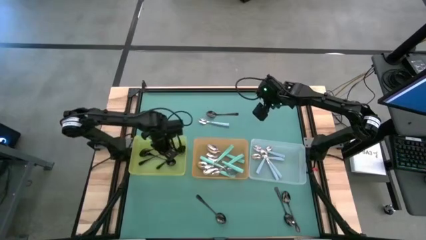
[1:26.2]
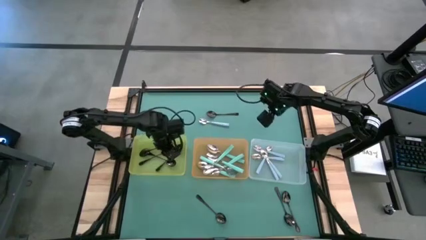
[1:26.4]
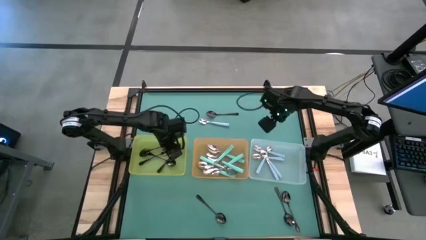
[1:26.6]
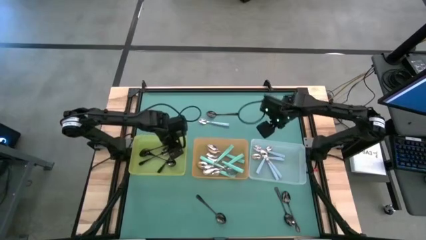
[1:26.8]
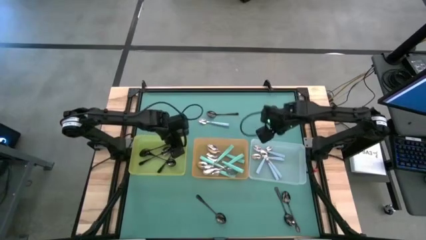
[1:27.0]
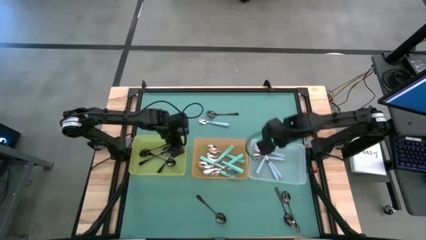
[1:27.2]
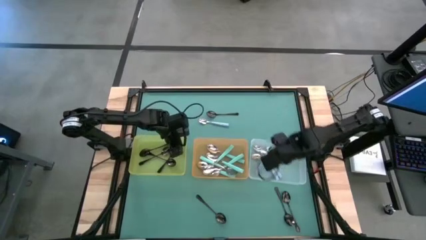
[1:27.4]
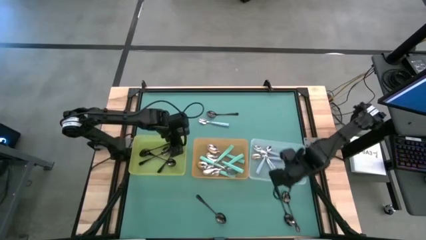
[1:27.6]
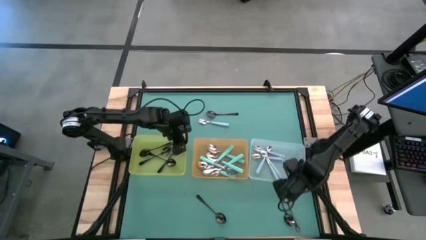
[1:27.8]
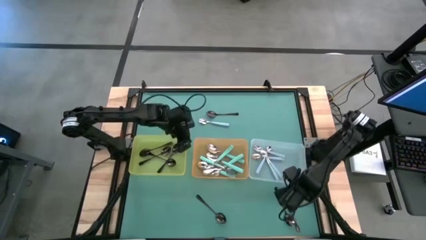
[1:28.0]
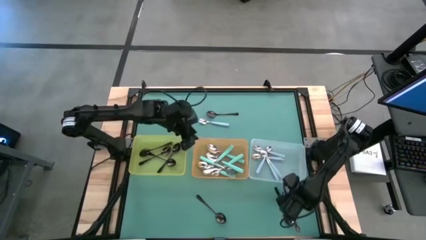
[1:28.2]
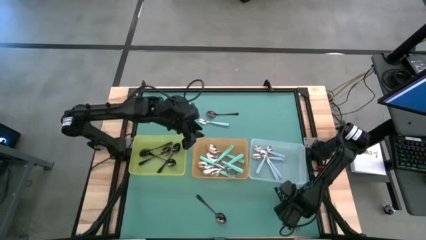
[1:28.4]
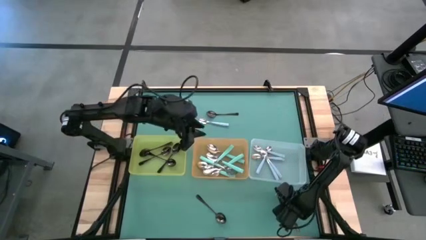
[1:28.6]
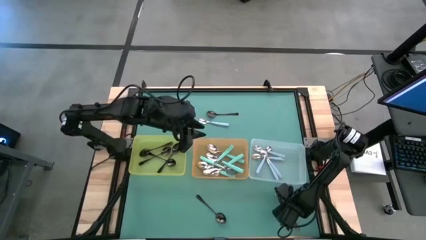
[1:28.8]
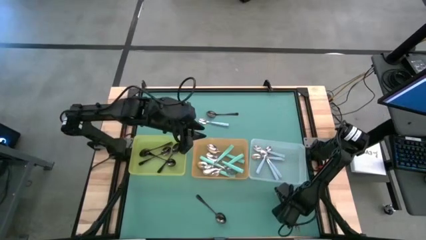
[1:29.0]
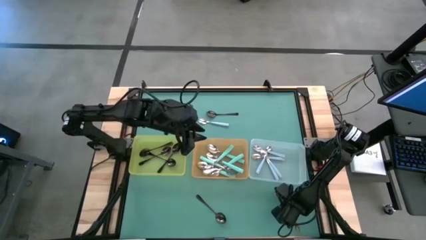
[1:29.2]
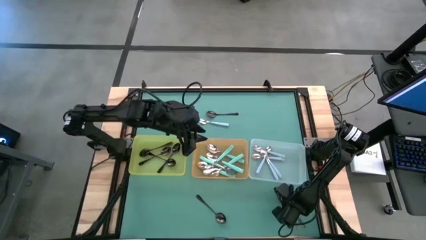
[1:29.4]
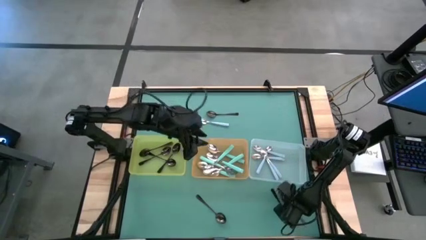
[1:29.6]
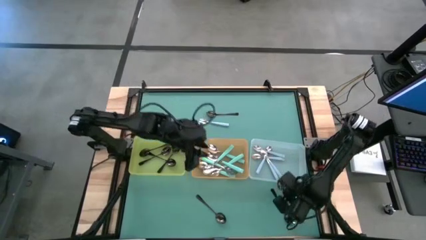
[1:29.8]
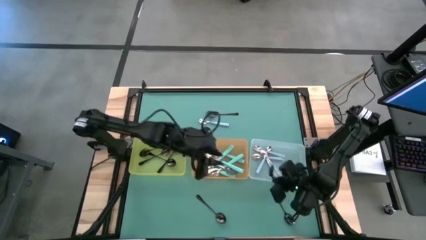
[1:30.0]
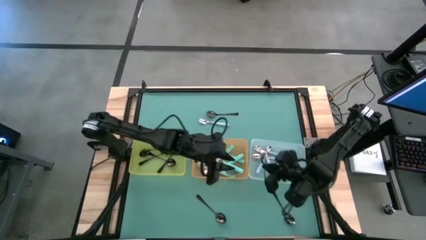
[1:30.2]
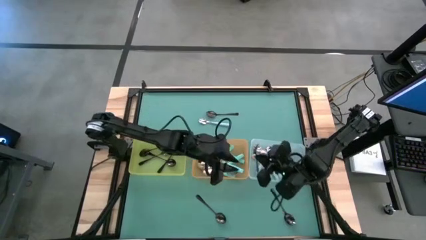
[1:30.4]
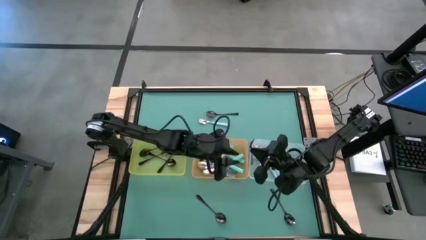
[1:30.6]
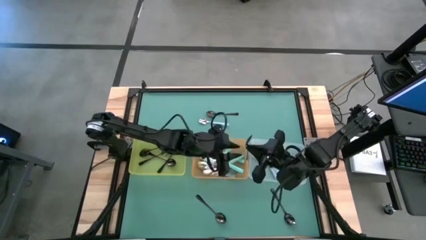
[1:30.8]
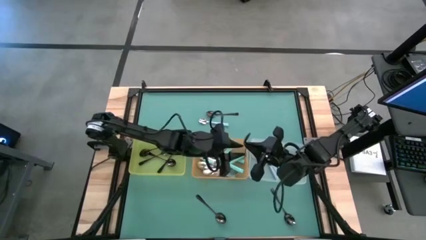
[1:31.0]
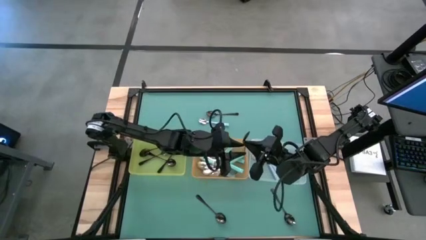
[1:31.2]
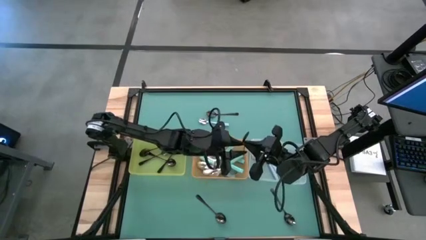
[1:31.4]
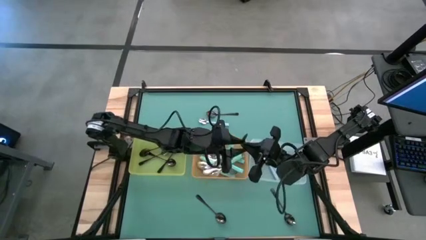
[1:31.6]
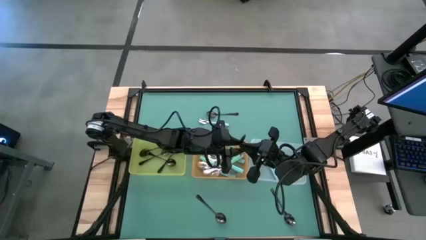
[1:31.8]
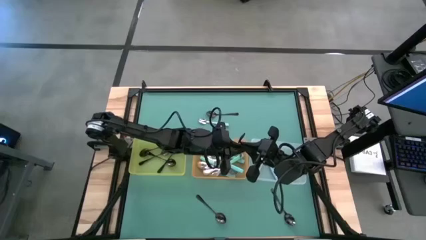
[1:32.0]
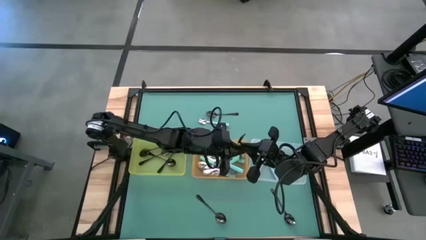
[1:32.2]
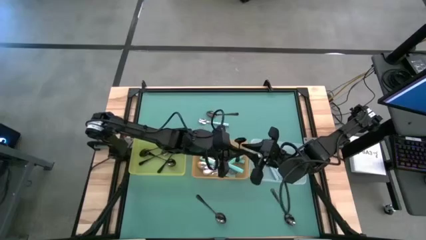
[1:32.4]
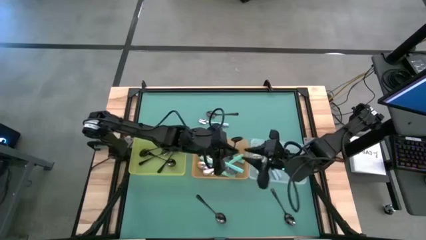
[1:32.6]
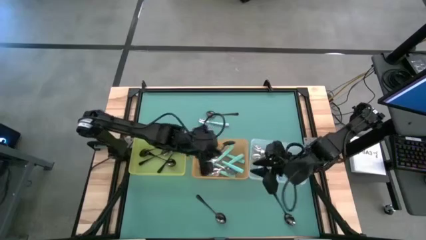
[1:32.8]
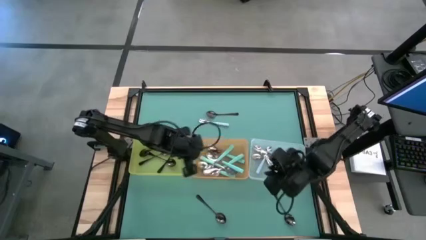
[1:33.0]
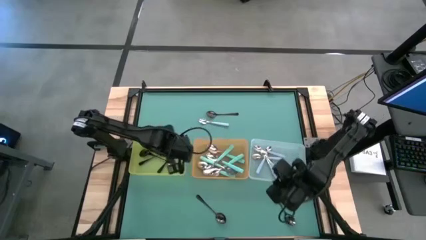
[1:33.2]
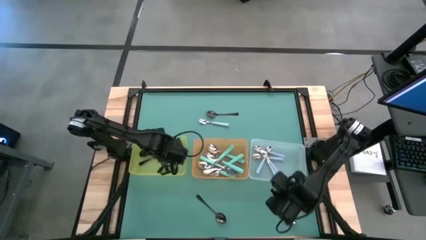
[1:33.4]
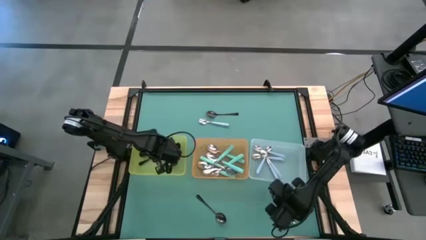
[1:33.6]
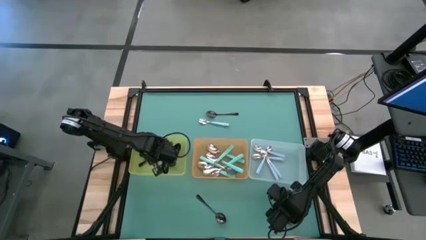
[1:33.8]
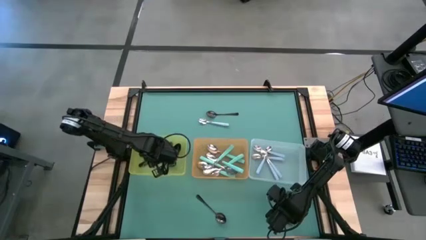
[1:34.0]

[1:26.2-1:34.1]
Task: Sort silverware by color (type)
Put the black spoon into the yellow bin

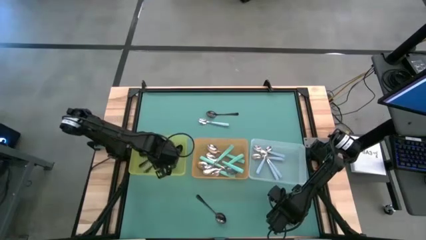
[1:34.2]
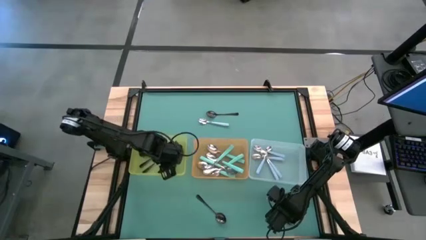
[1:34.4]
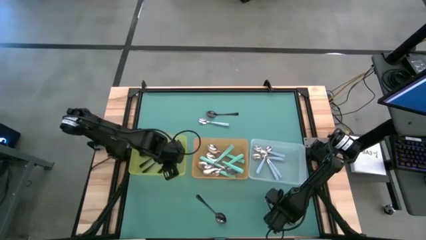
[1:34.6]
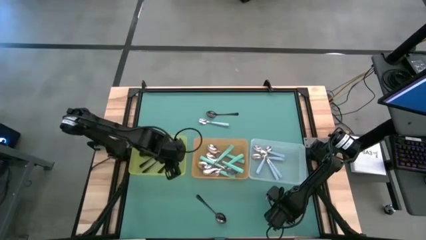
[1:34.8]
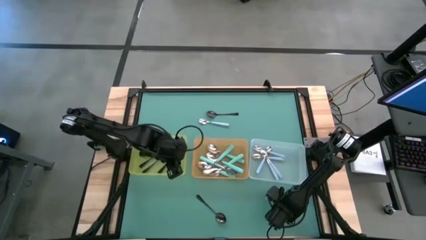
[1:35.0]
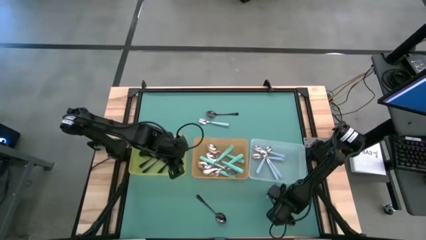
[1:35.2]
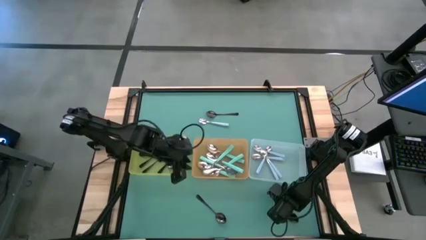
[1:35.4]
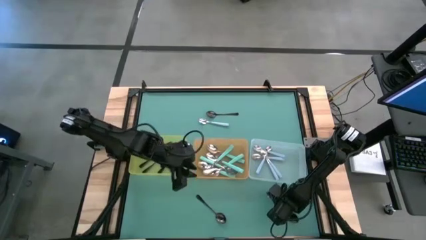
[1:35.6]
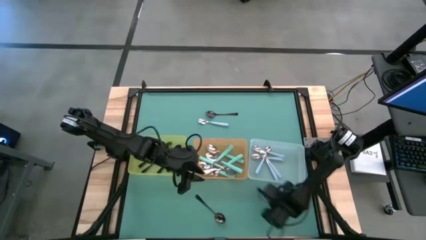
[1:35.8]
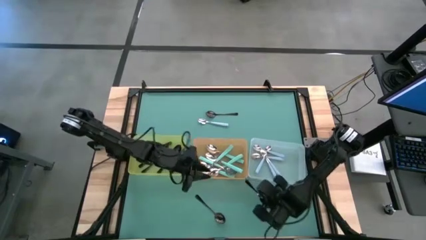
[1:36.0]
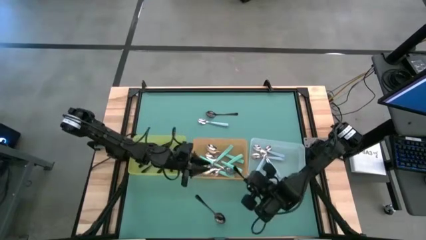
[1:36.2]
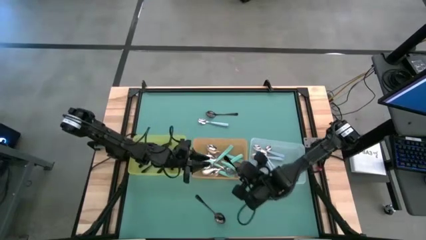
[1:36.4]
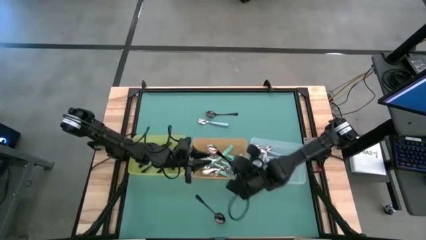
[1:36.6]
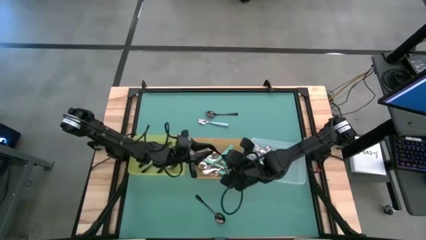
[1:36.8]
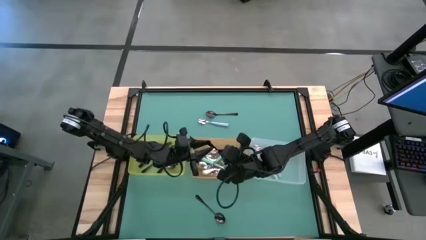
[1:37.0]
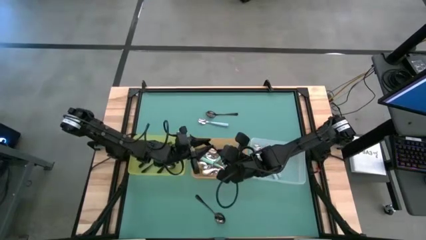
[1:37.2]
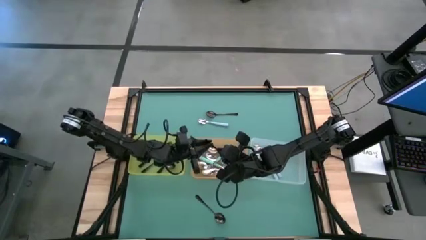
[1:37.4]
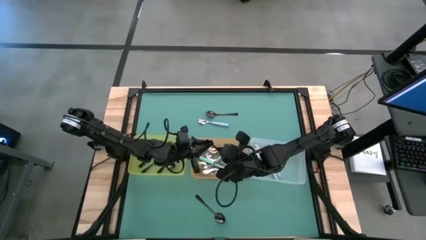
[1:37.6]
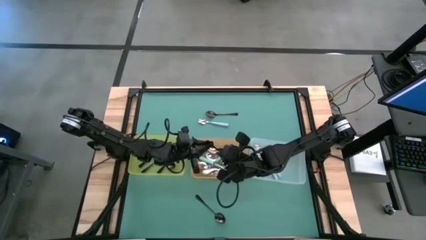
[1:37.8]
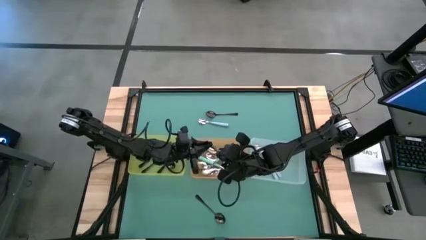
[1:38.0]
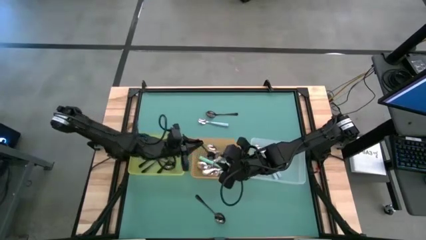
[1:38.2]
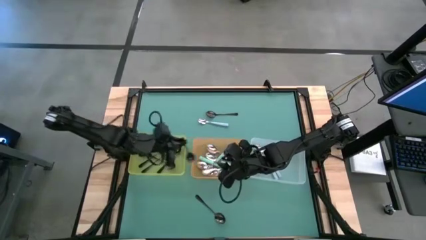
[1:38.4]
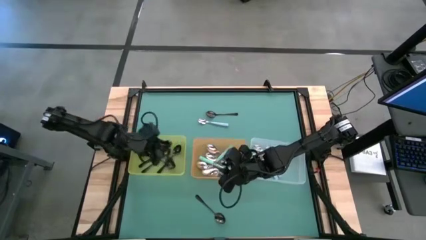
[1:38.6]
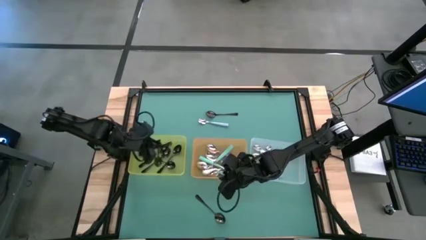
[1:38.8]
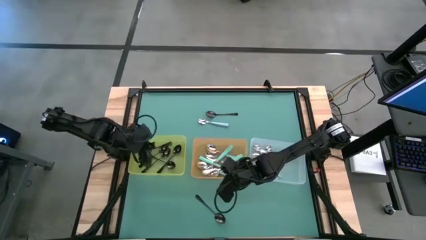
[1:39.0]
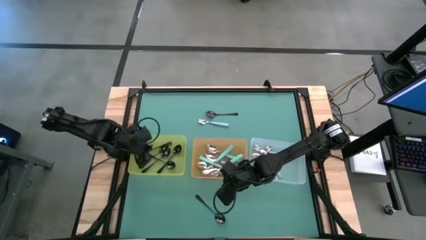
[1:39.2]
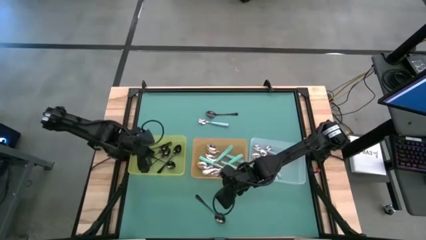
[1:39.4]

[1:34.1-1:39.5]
Put the black spoon into the yellow bin

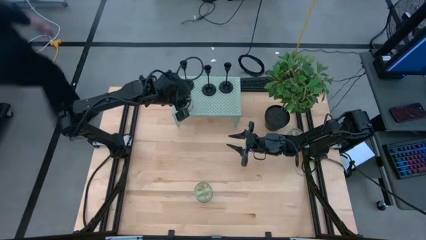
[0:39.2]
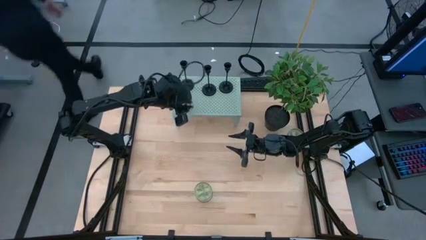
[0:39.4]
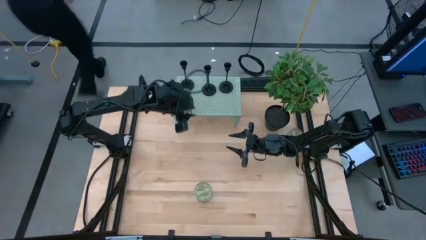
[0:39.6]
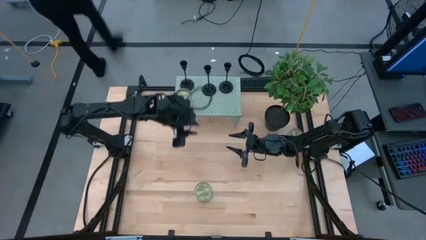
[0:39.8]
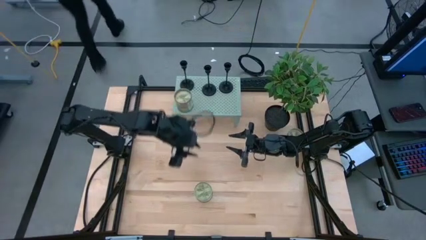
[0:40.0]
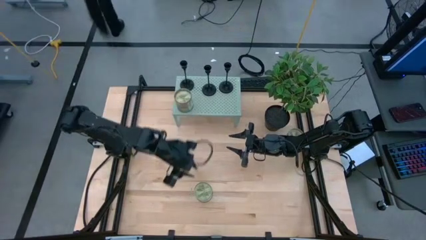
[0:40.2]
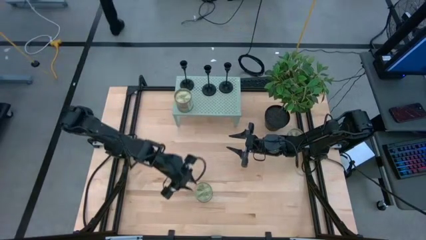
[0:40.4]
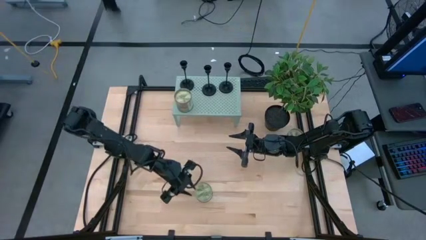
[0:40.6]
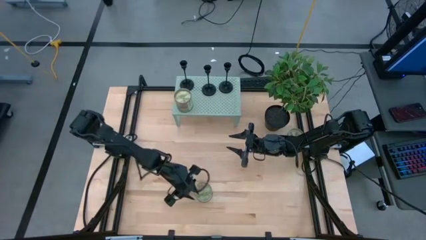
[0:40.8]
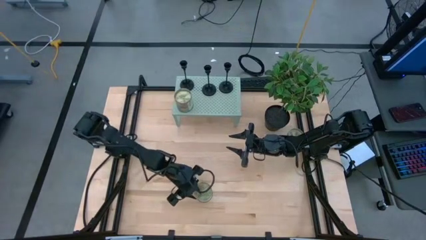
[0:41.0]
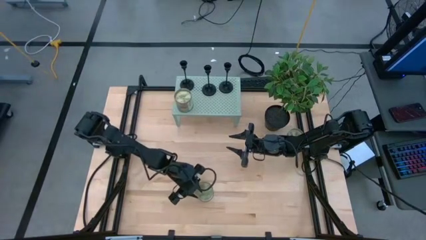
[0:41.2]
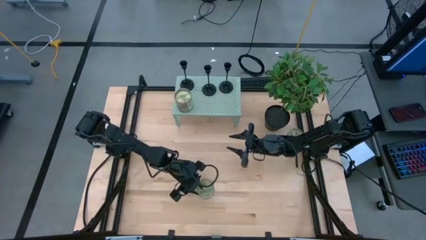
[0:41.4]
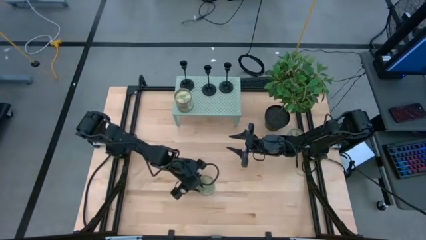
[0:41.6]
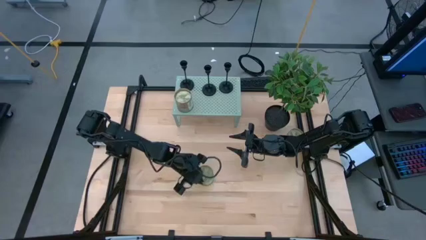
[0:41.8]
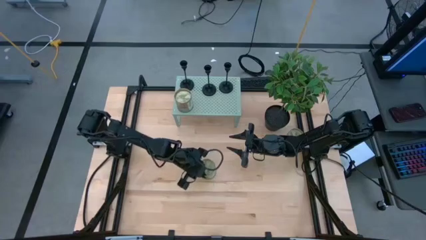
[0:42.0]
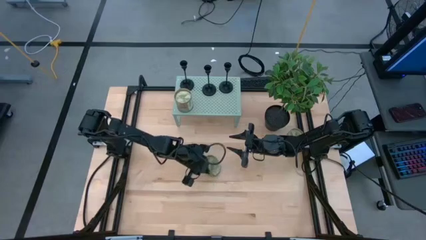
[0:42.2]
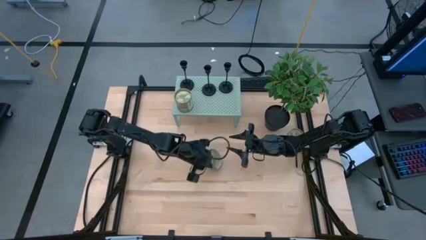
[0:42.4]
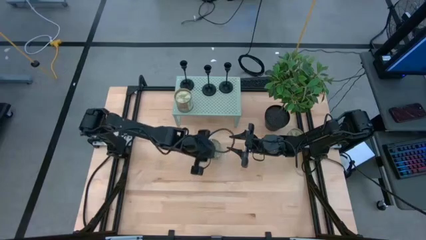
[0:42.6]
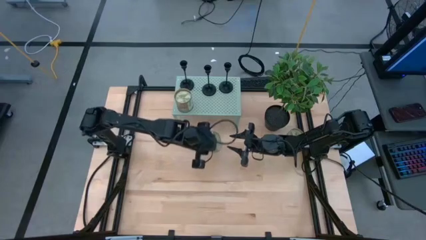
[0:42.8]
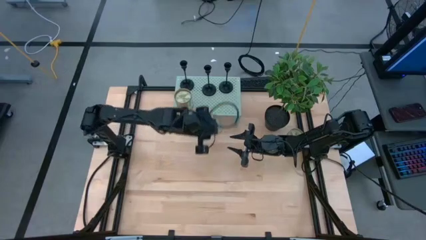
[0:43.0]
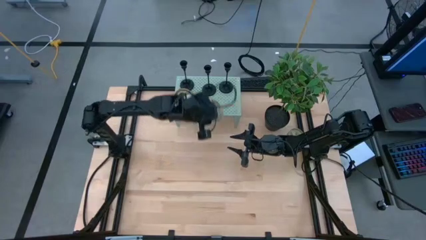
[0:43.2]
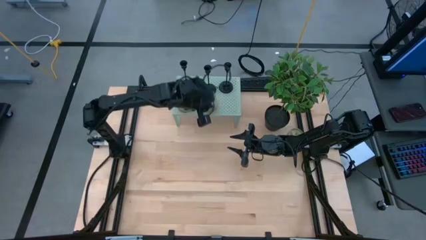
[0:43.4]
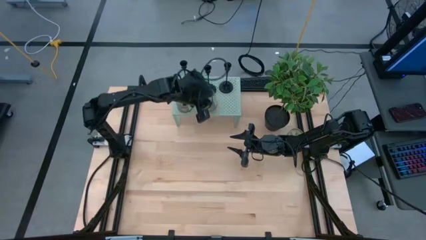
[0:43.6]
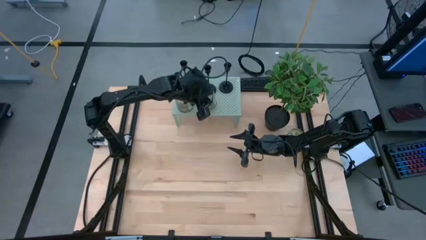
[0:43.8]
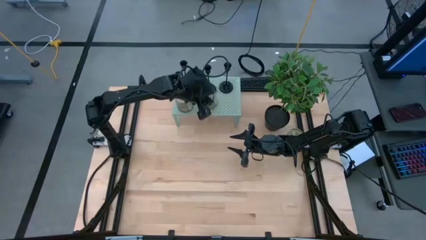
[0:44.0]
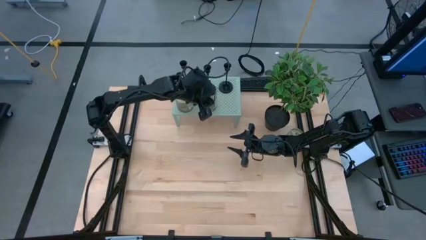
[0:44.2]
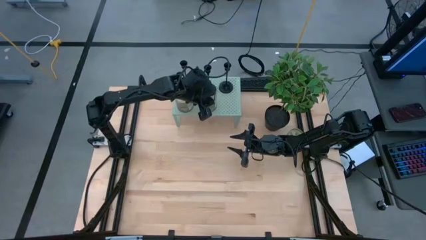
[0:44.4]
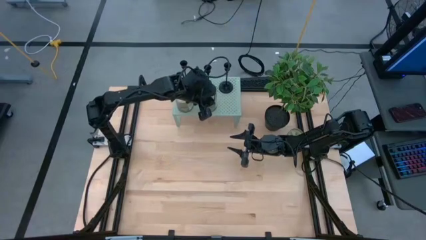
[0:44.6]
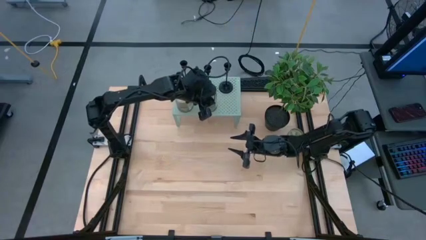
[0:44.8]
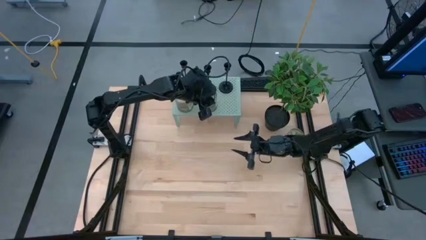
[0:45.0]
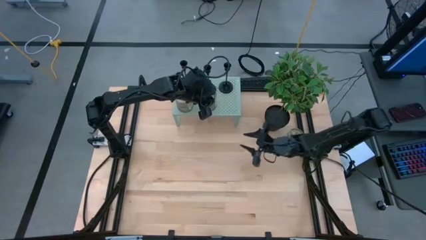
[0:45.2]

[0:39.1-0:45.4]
Task: Pick & Place candle stick holders
Put the left scented candle on the shelf
